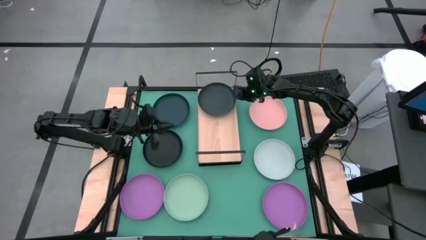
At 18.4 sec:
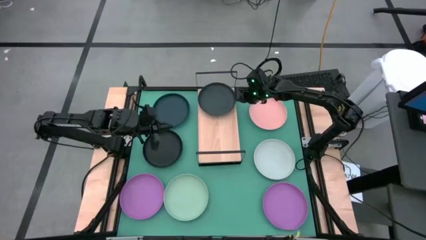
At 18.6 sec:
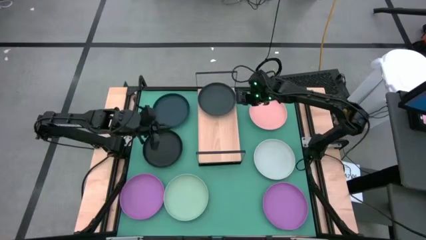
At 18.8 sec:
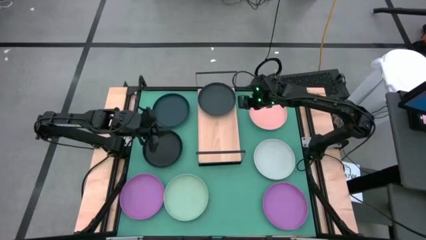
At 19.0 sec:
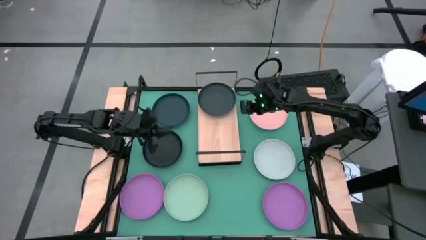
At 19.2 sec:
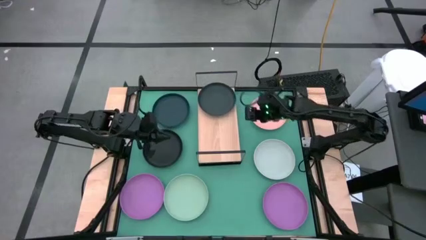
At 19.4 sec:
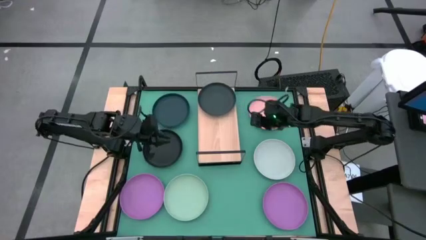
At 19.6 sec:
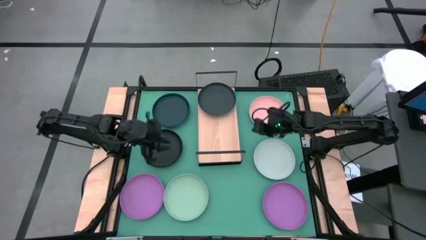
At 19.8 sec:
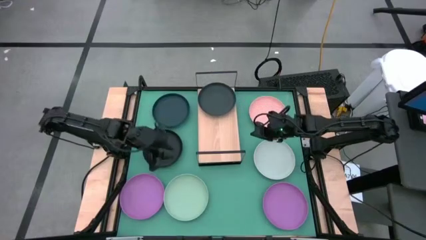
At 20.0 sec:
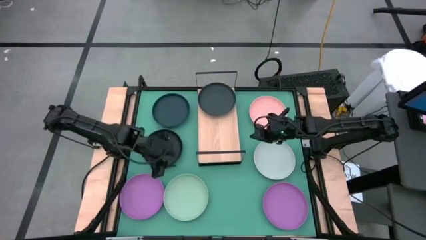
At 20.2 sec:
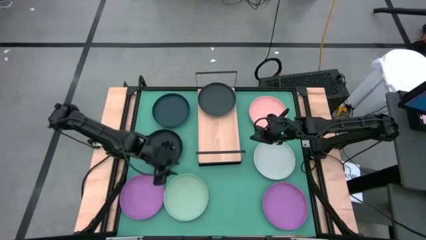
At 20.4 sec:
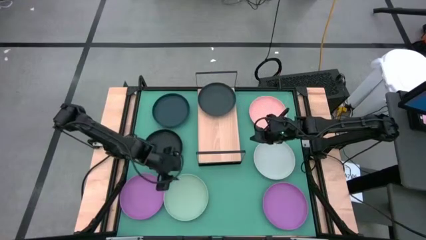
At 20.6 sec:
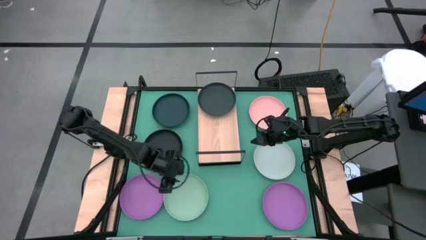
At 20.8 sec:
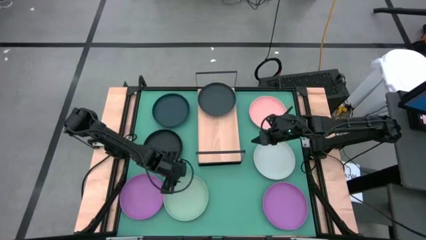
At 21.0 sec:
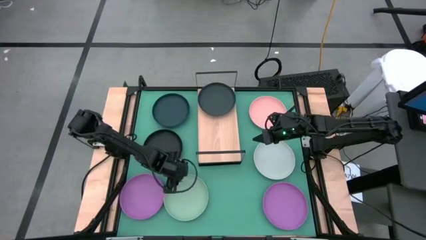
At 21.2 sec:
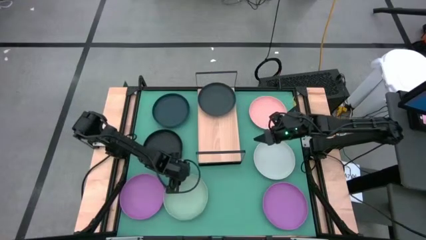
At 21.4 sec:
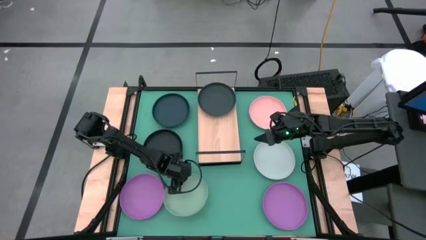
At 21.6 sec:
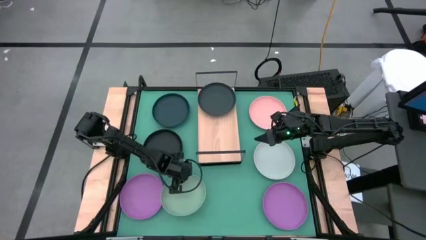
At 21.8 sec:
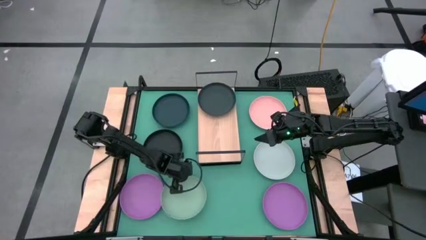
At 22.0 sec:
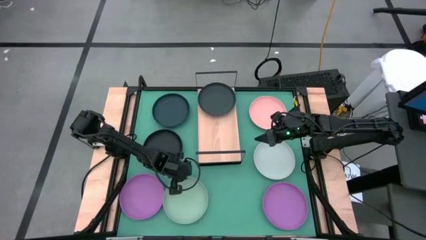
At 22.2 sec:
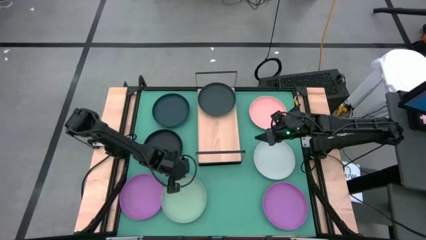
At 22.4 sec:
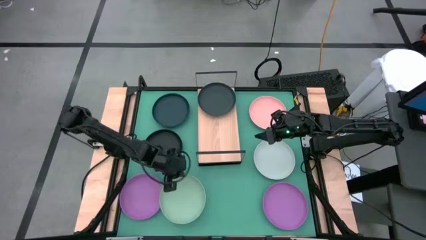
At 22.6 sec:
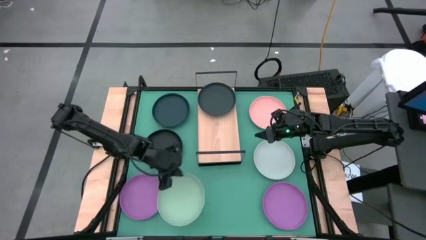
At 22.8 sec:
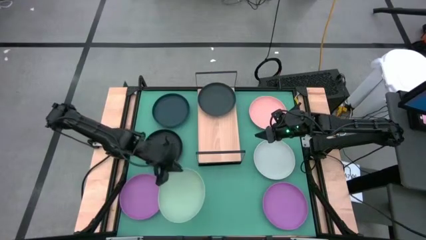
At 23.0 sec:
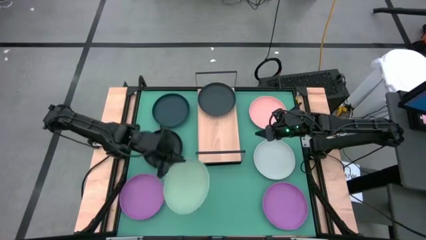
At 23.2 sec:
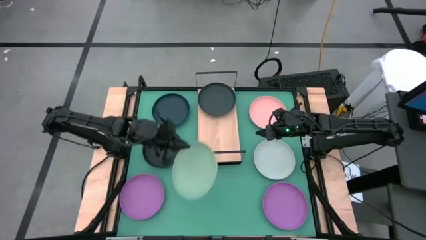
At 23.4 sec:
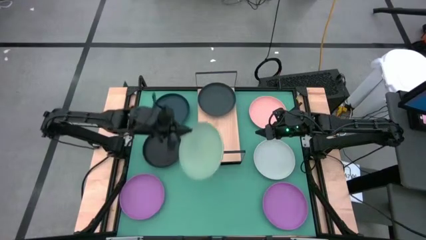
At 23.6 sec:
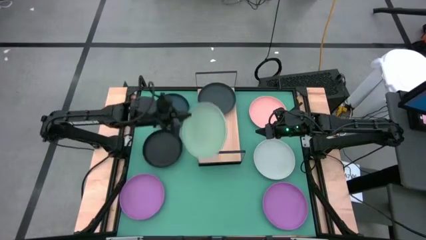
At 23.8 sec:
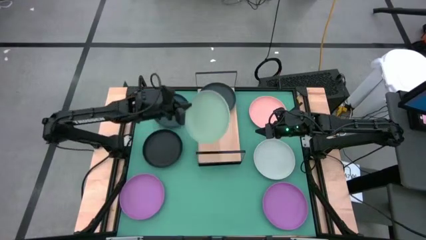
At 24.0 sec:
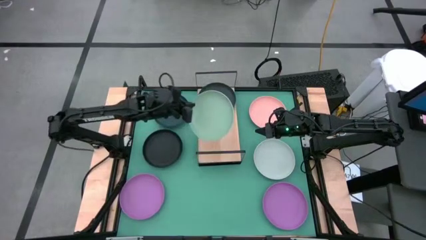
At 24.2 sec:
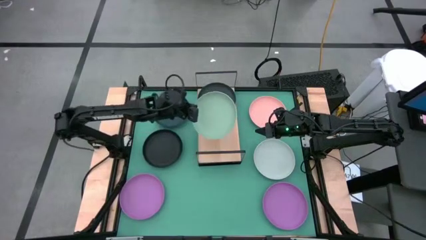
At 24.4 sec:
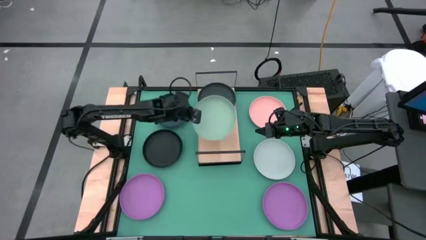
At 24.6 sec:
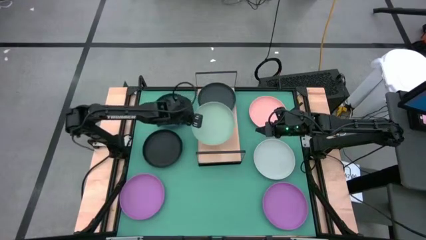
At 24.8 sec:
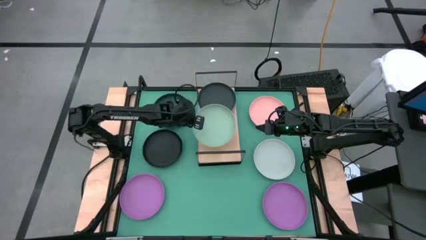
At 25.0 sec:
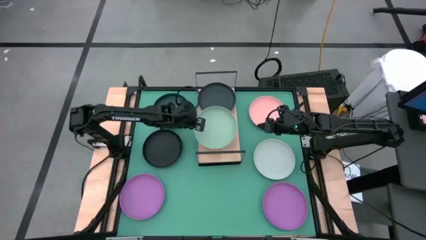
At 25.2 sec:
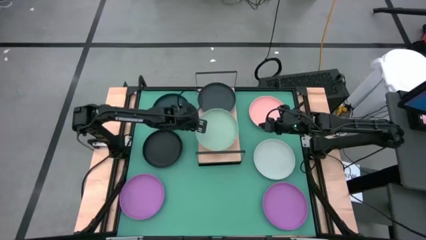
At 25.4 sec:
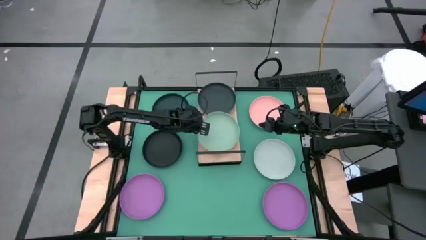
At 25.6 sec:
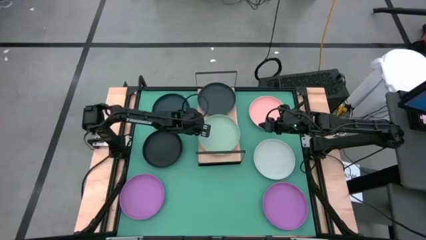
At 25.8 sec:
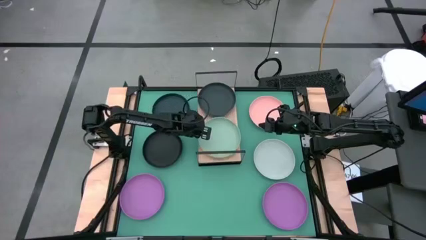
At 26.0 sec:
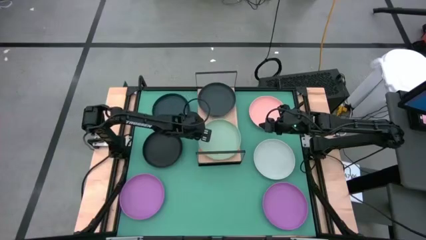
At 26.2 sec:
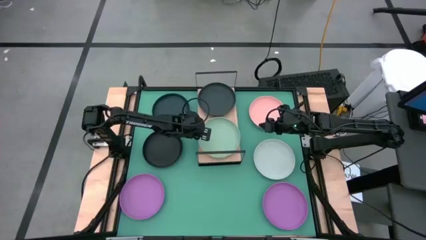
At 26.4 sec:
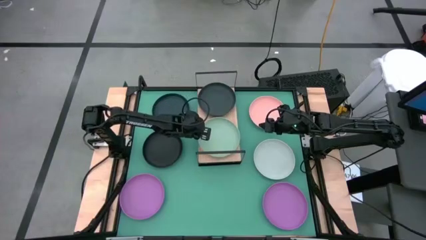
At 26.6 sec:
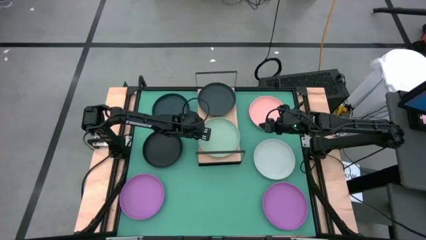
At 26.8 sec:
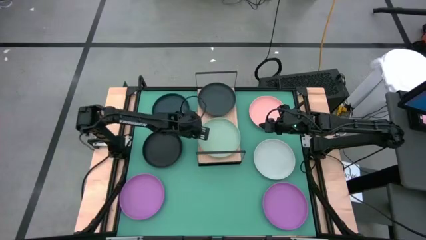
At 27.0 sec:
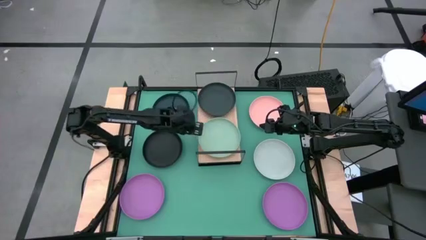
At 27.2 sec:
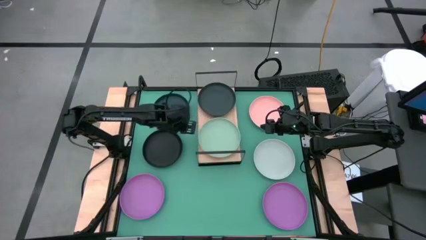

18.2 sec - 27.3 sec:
Task: Place and stack plates onto a shelf
Put the green plate on the shelf

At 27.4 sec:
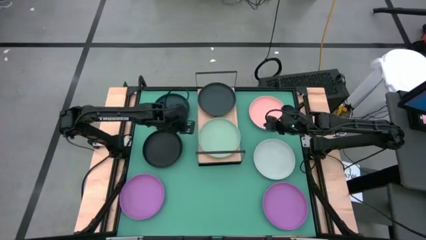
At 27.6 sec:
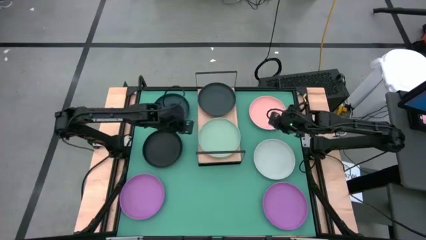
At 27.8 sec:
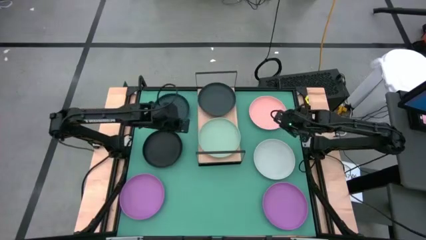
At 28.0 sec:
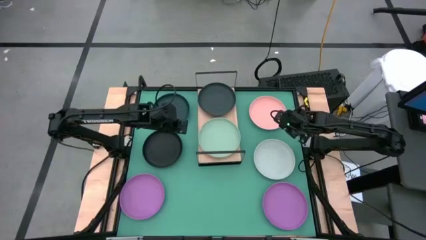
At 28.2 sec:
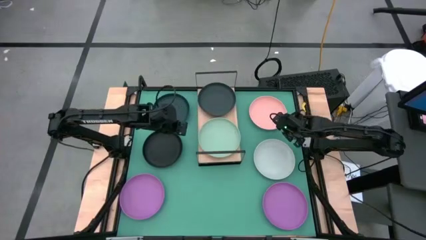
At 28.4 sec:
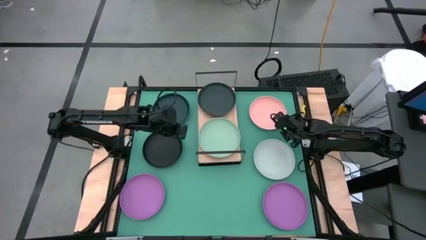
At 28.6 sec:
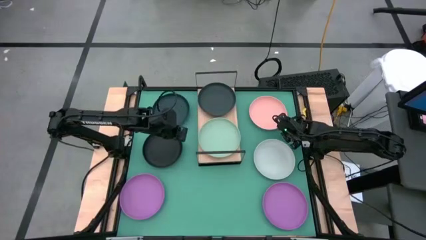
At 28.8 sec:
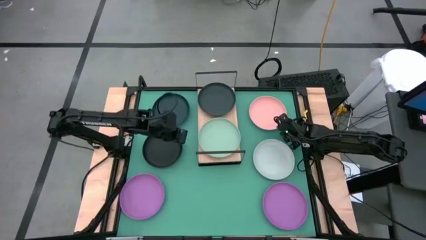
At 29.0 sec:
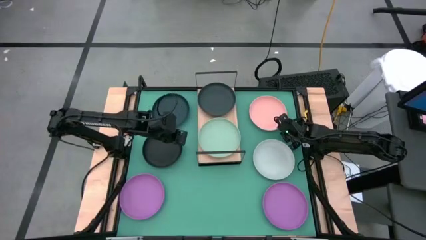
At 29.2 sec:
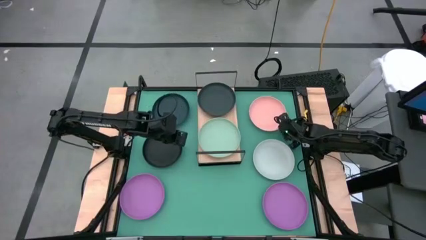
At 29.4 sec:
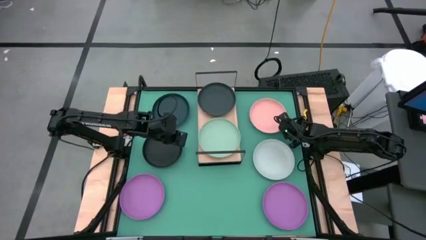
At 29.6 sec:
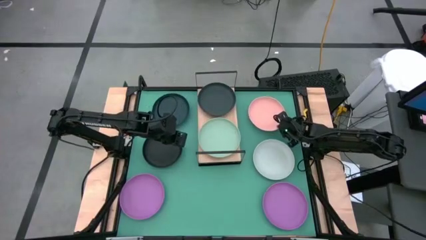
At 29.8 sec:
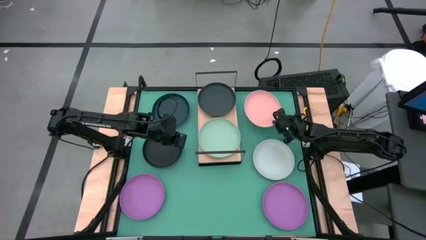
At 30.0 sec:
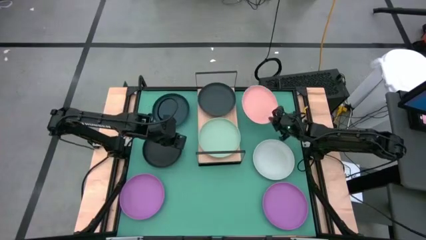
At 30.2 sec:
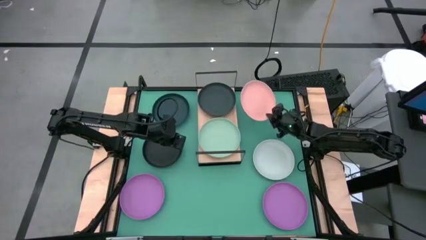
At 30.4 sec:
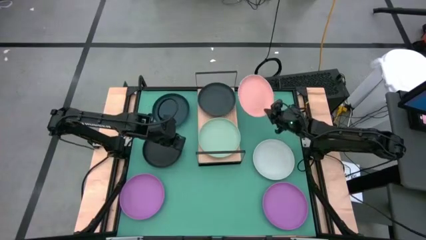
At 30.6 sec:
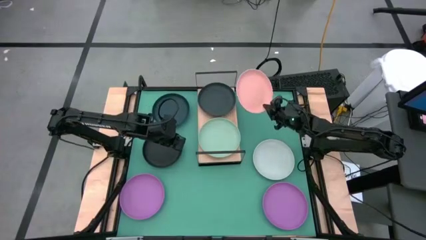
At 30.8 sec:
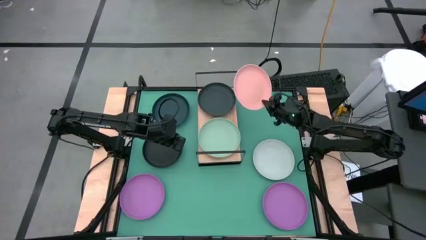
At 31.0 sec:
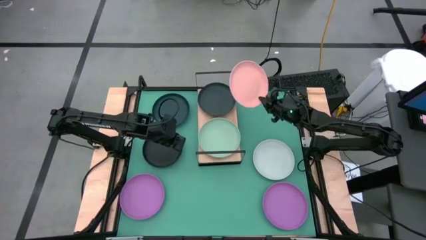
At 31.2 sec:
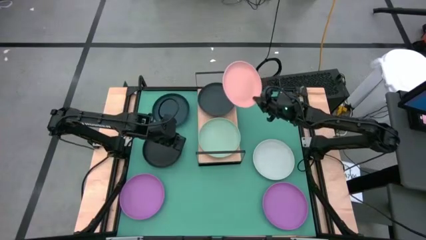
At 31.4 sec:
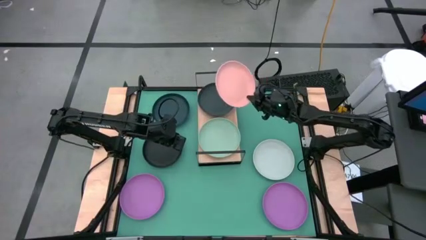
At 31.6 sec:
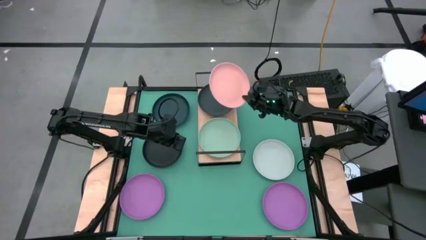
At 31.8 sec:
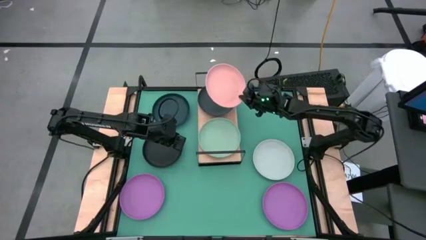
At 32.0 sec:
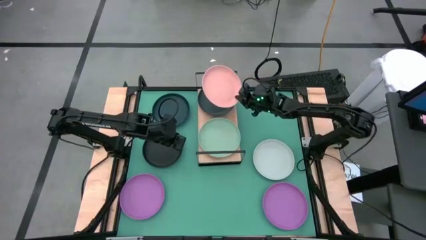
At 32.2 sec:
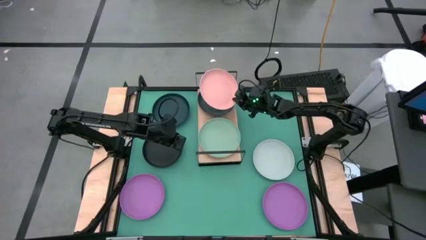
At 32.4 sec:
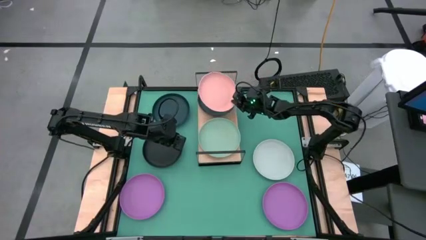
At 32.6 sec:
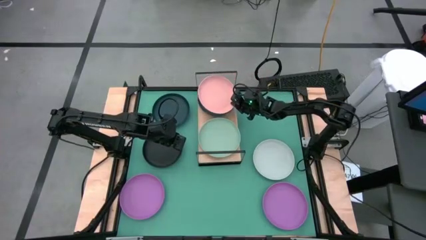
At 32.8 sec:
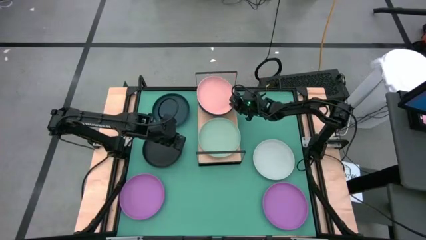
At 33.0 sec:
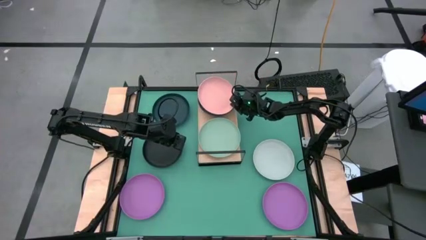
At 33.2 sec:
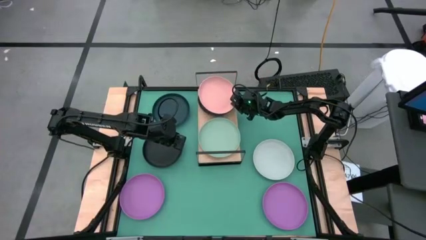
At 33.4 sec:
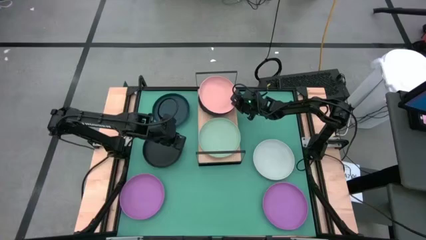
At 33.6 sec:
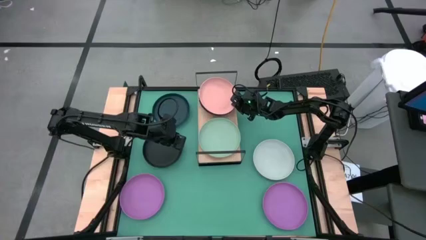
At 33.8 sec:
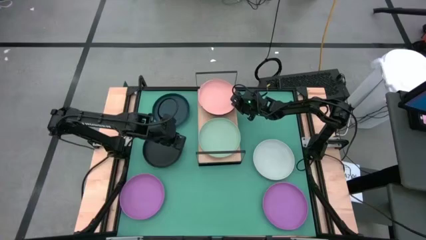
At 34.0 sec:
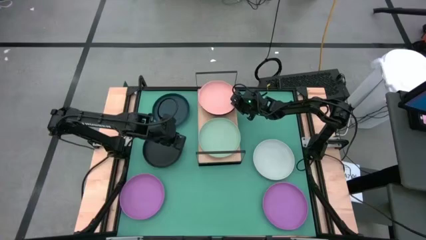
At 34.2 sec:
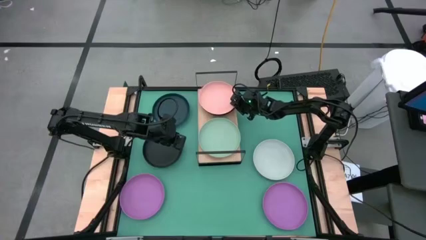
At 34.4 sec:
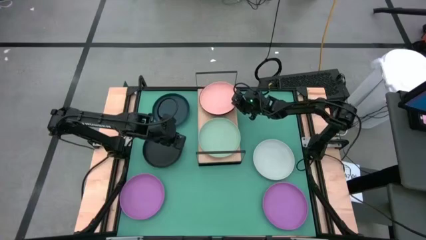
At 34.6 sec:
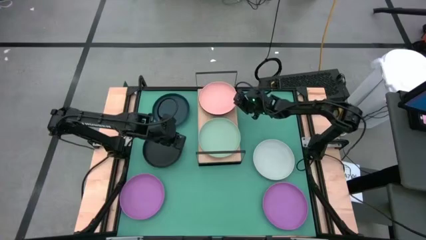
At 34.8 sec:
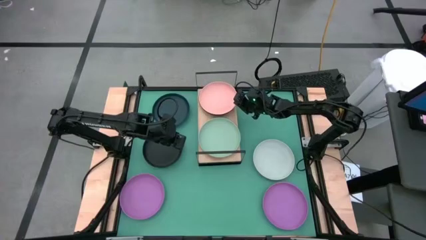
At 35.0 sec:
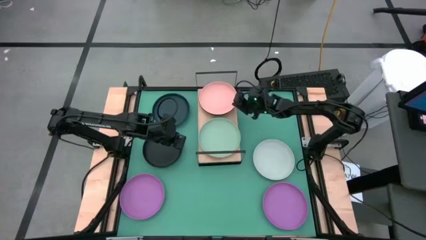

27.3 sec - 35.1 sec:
Stack the pink plate on top of the black plate on the shelf
